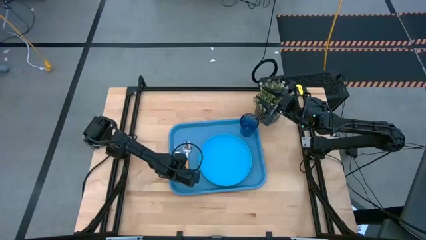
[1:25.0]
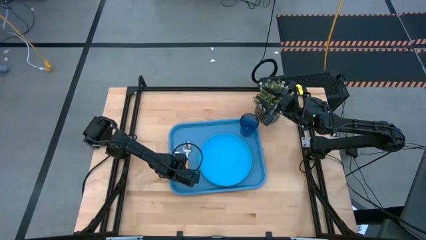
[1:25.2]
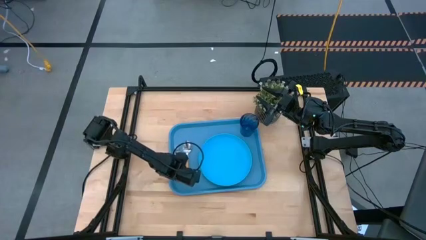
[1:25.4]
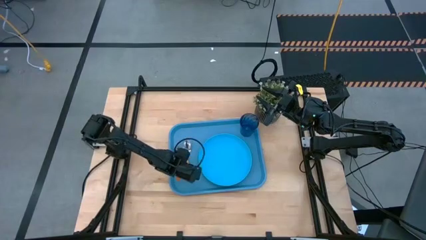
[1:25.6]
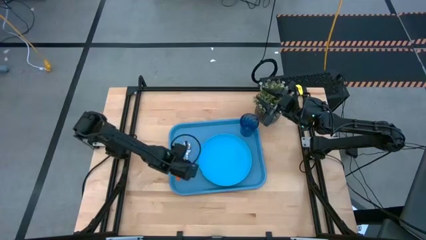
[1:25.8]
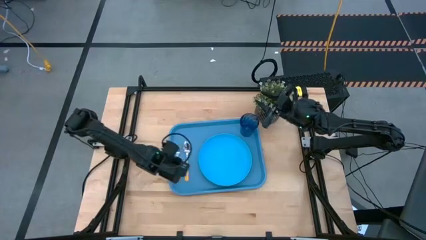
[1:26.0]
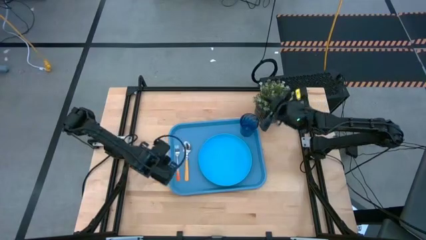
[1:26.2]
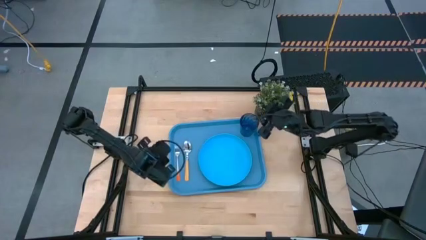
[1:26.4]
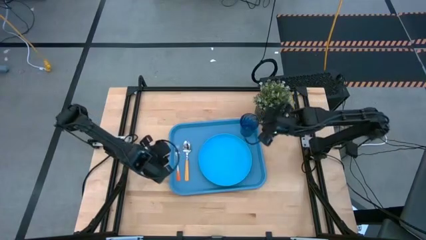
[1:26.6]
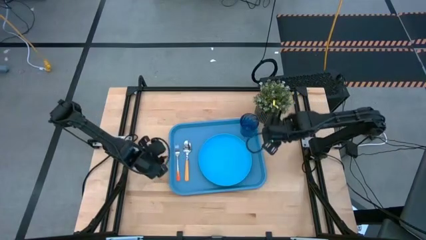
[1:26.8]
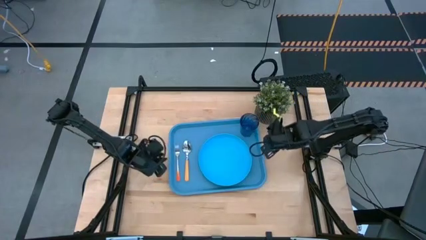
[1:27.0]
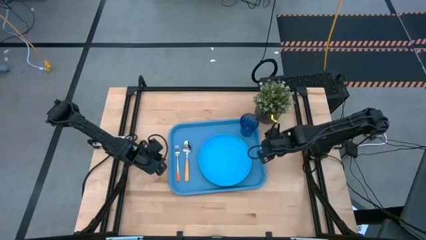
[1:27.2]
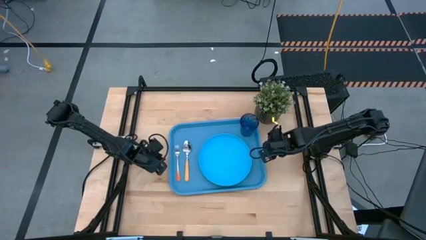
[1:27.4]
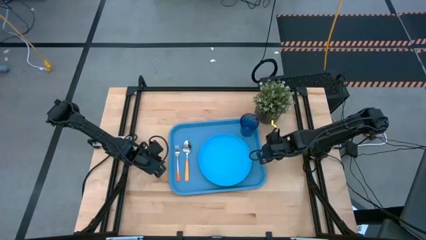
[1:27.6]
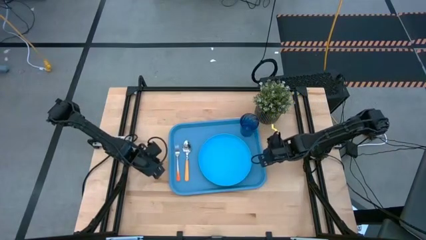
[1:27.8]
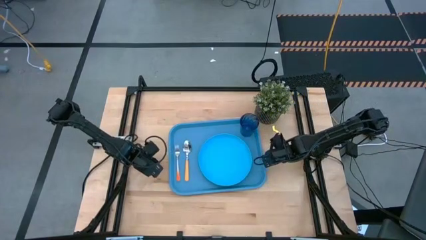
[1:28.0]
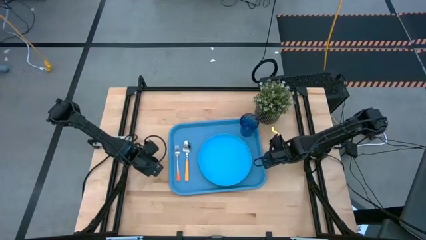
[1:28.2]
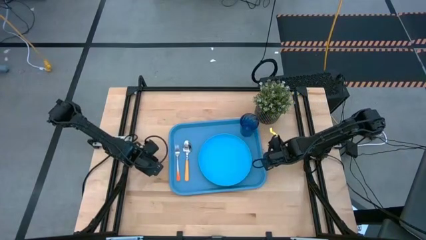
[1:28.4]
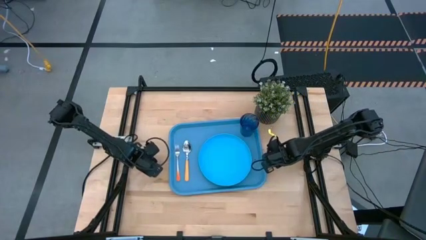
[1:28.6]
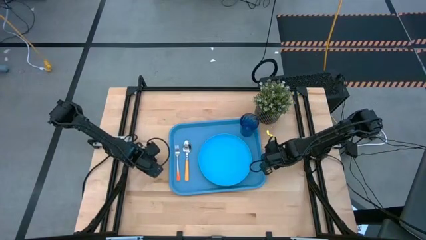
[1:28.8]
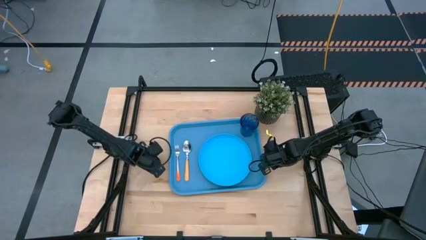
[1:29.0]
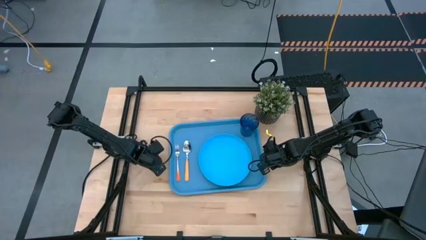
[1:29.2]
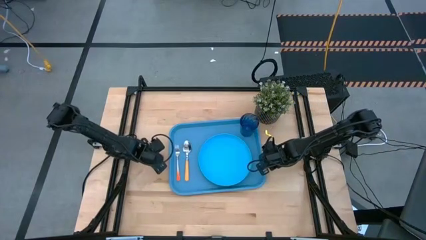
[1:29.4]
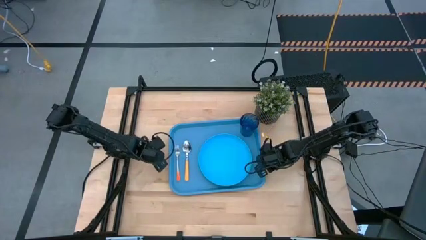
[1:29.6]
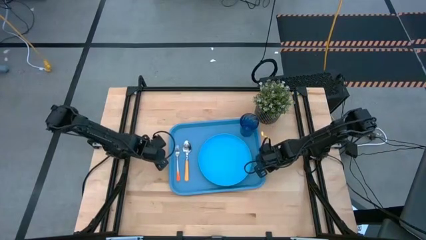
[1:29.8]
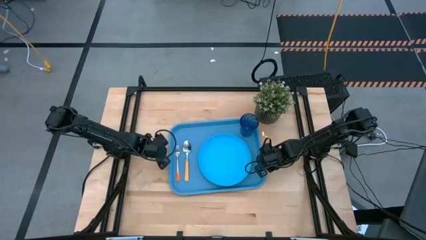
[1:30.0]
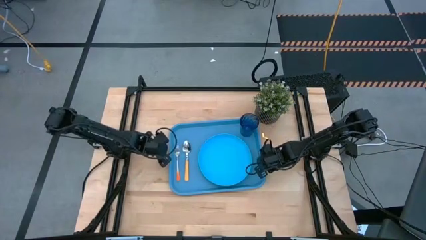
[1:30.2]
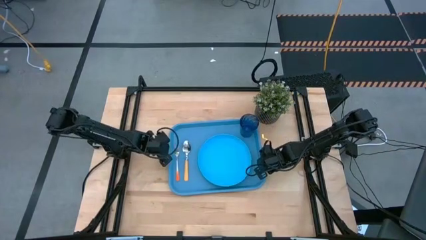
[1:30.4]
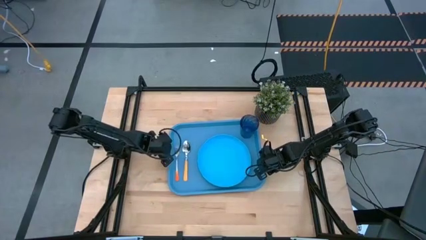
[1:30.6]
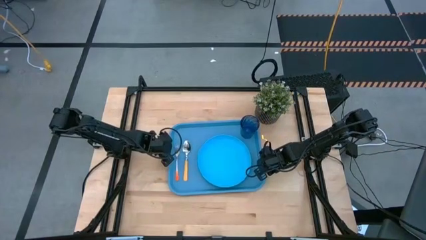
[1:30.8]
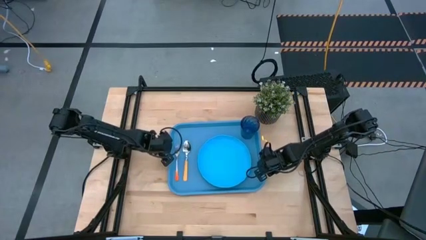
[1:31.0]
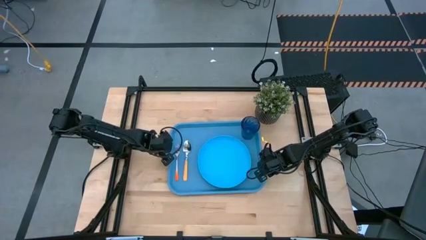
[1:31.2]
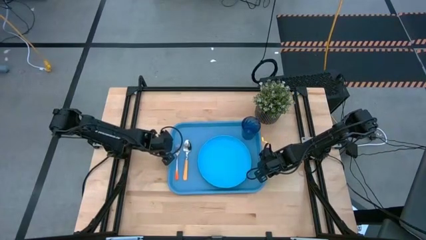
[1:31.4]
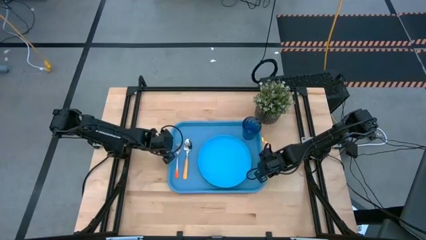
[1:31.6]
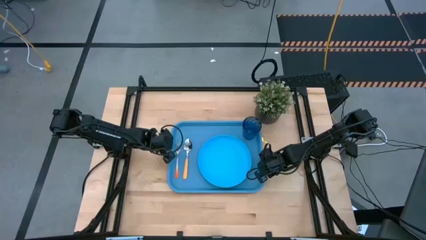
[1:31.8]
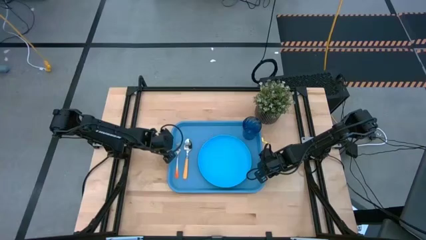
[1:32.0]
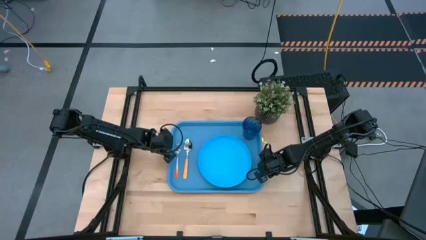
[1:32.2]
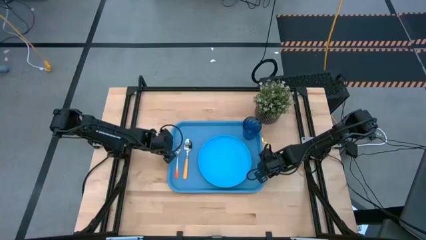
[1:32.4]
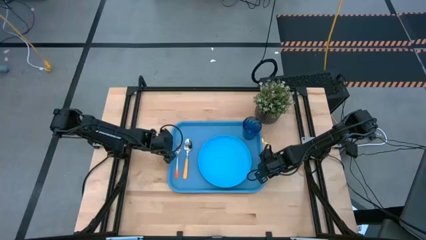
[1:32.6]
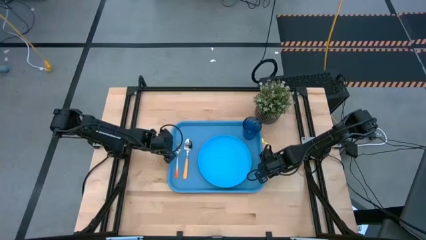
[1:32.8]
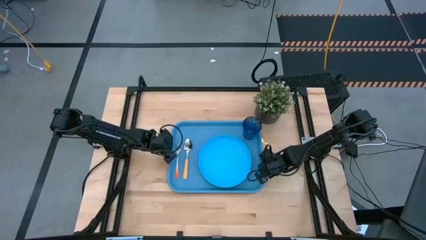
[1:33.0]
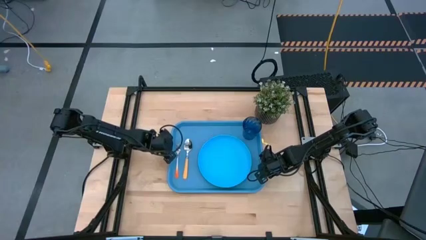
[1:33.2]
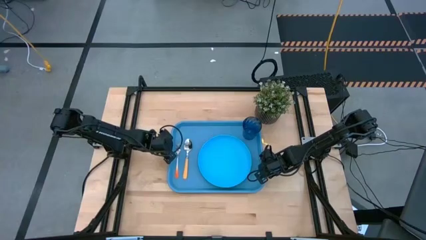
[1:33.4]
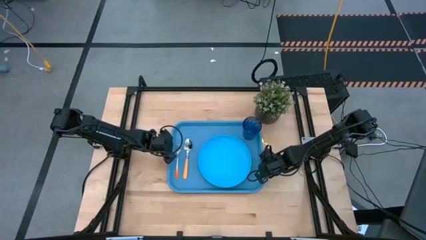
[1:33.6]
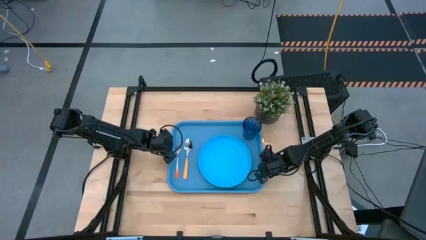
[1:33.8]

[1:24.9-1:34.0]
Task: Pick and place plate/cup/fork/spoon on tray
Adjust the blue tray

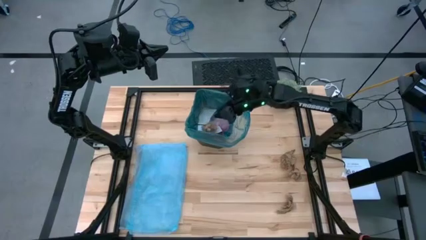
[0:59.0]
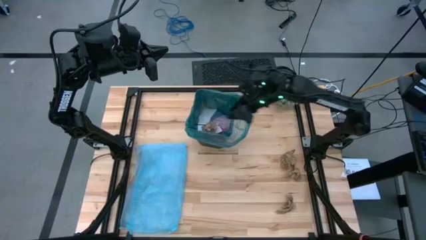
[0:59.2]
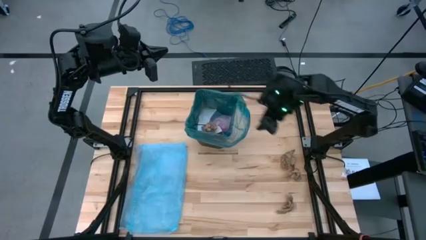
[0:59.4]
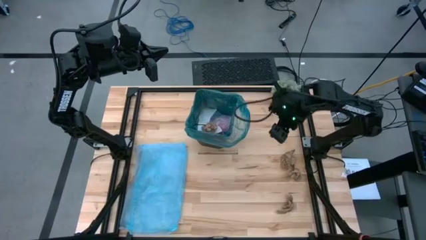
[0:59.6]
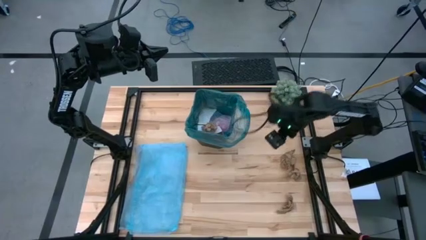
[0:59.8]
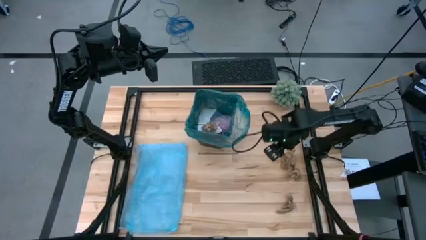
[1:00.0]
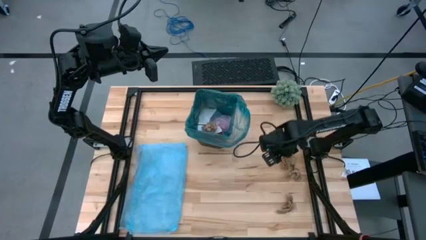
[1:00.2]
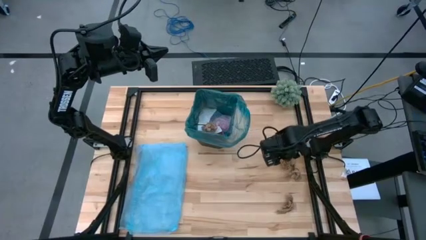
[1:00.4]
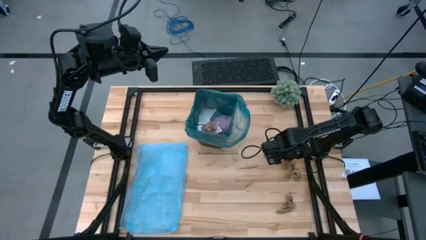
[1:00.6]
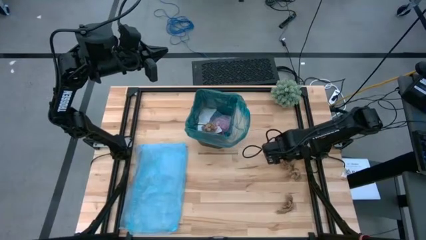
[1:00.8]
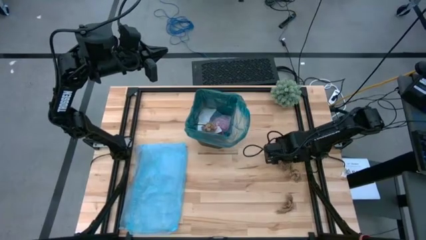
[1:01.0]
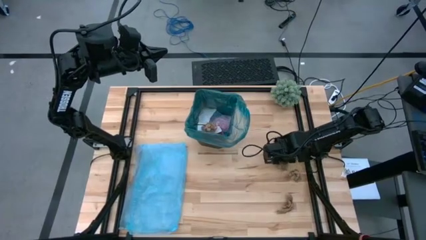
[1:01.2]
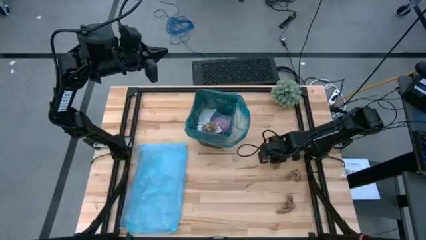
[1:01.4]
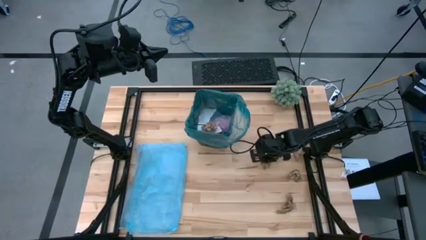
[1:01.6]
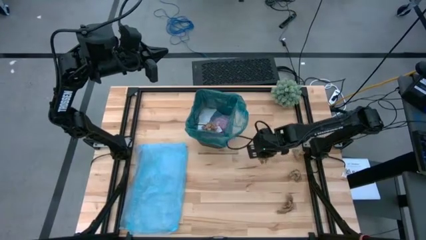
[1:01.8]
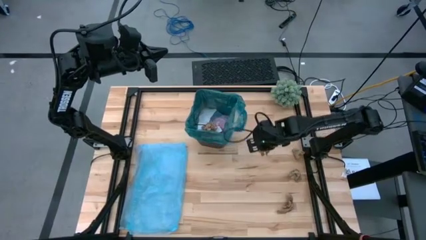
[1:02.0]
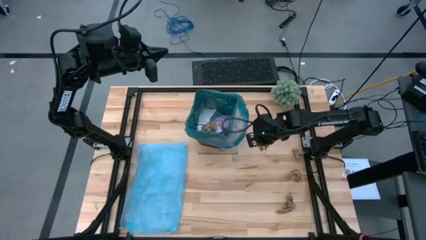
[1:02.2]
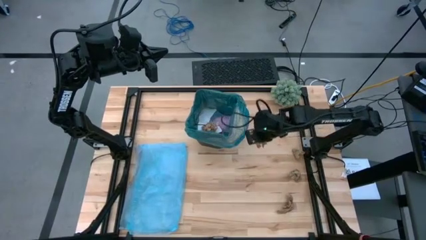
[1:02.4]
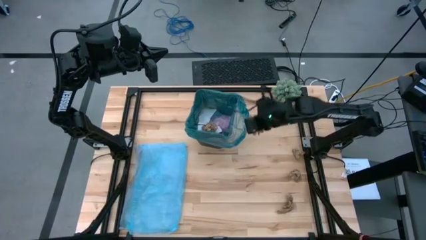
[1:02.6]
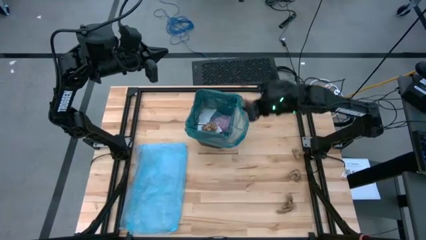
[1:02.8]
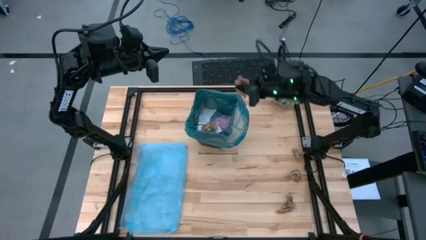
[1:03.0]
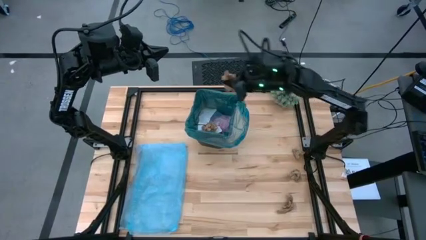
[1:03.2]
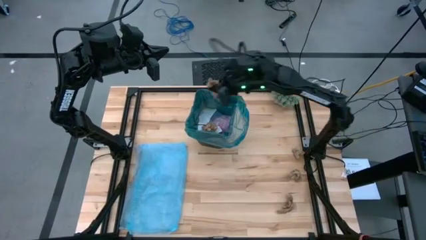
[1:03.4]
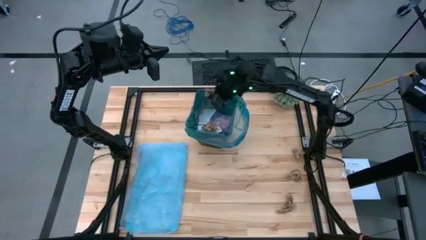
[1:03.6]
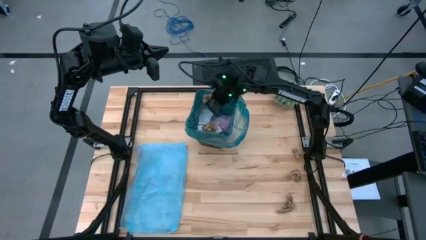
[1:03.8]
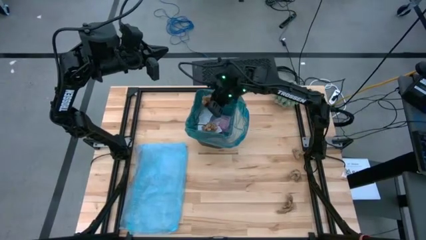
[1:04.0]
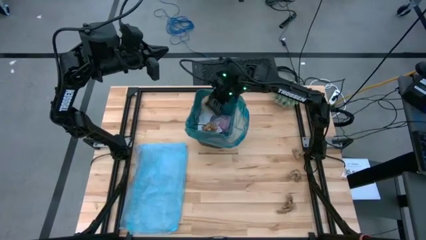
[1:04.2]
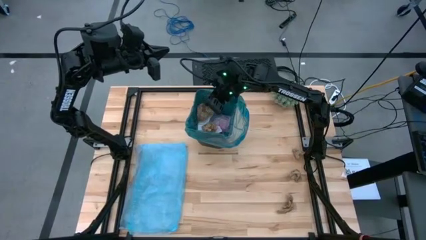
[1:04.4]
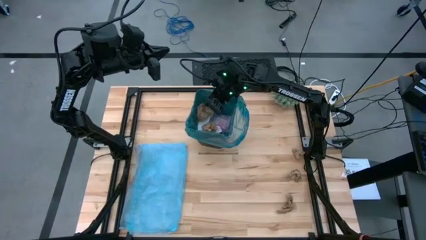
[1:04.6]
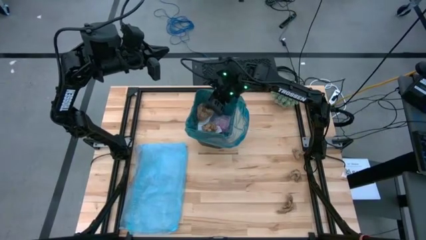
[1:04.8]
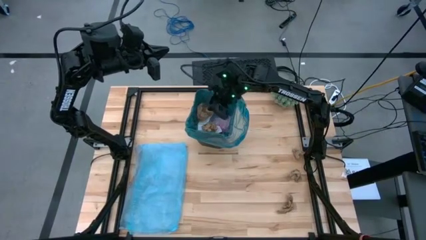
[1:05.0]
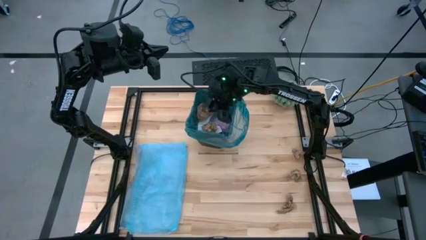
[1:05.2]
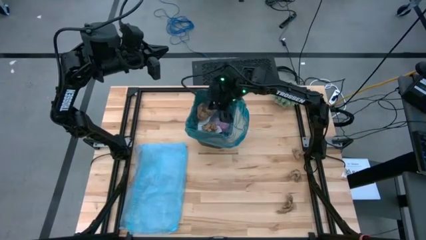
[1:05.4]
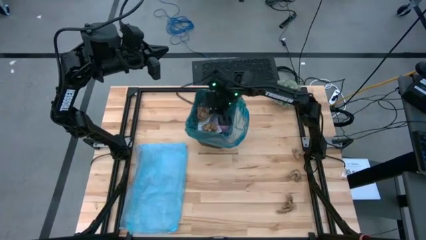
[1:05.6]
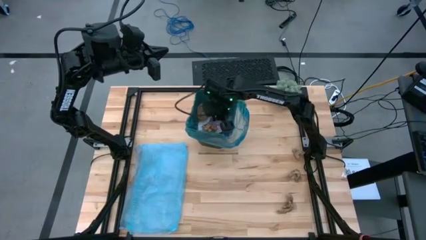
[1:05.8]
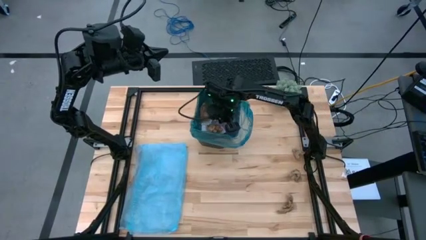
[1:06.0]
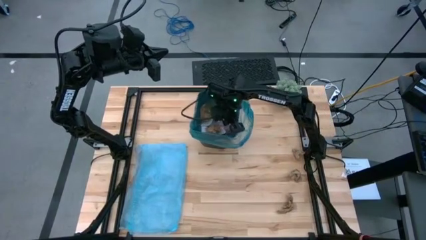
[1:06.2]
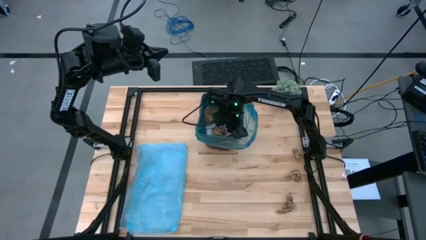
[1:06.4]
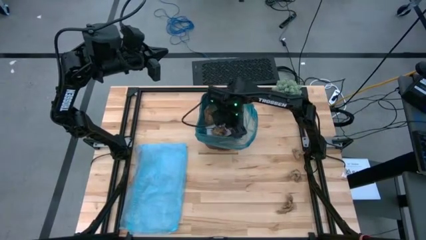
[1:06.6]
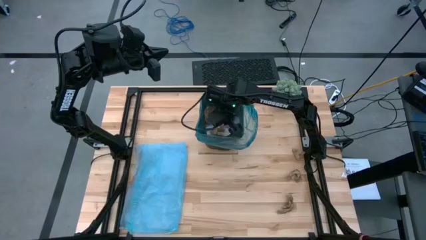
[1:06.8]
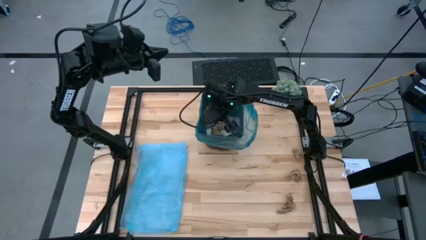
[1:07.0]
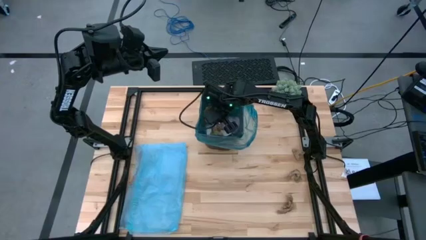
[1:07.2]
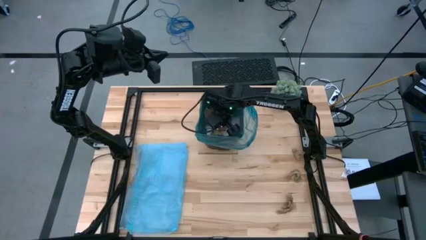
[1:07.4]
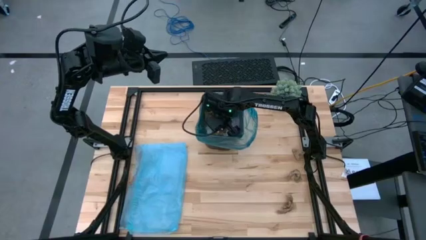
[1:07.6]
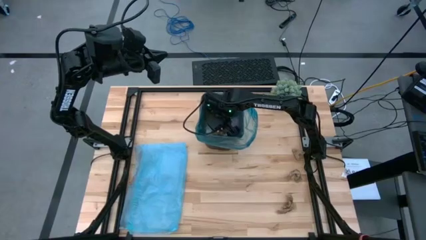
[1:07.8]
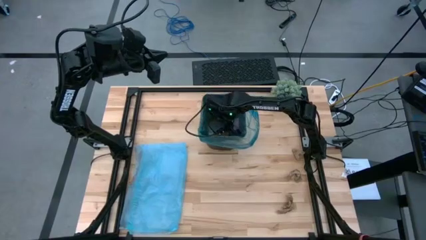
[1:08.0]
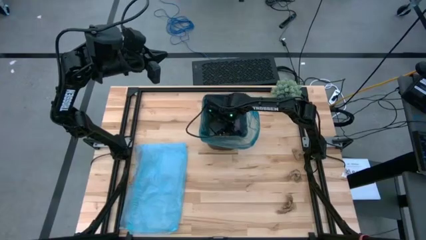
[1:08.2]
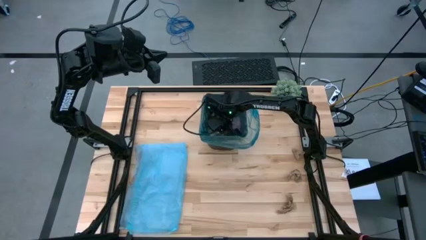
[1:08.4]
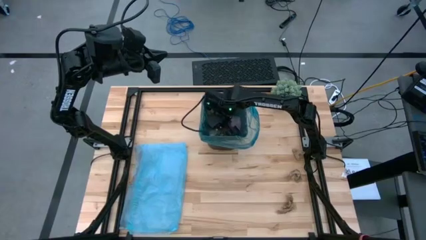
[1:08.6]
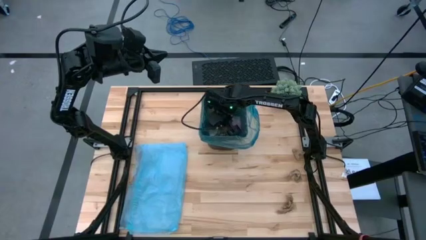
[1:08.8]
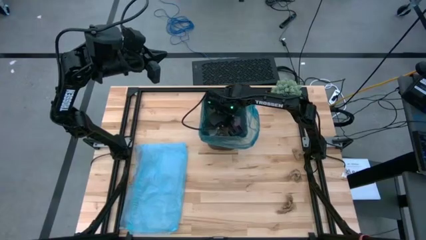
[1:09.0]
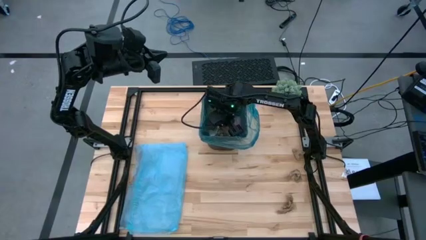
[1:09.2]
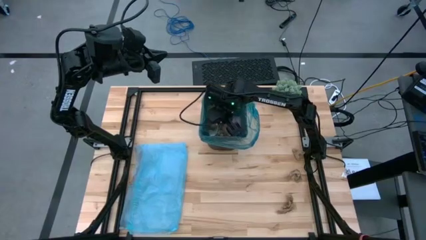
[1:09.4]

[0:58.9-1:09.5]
Task: place trash/remove bag and relplace
Put the brown napkin into the trash bin
